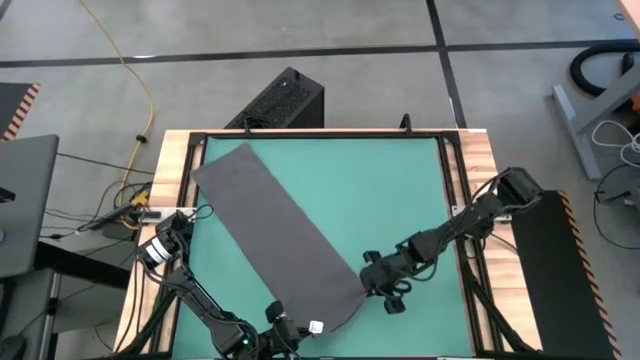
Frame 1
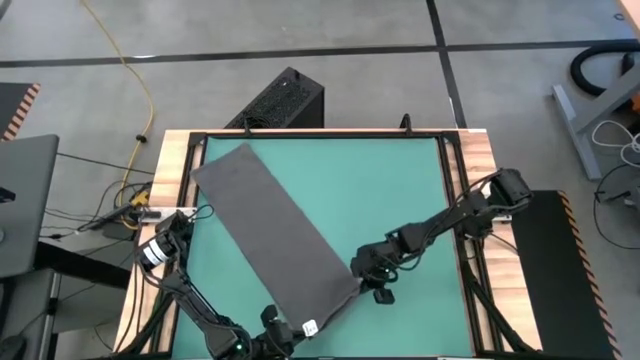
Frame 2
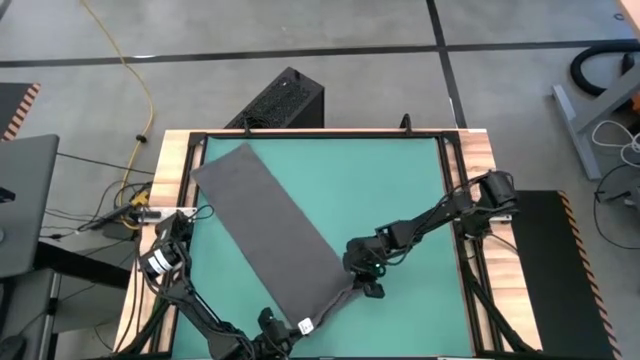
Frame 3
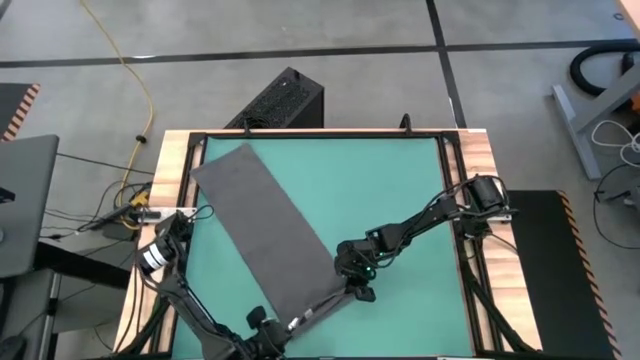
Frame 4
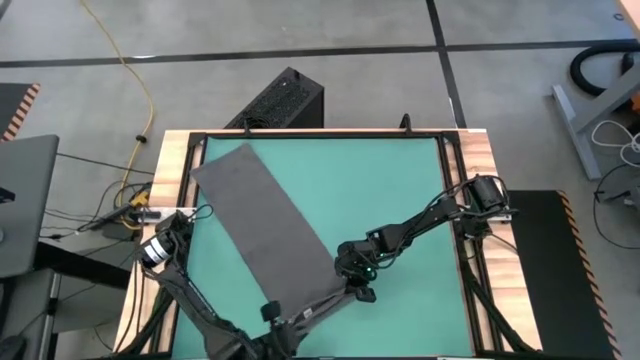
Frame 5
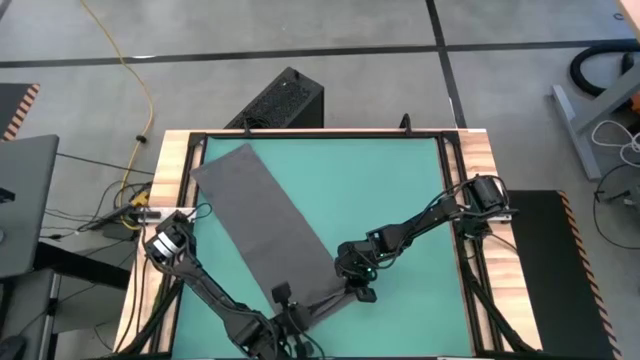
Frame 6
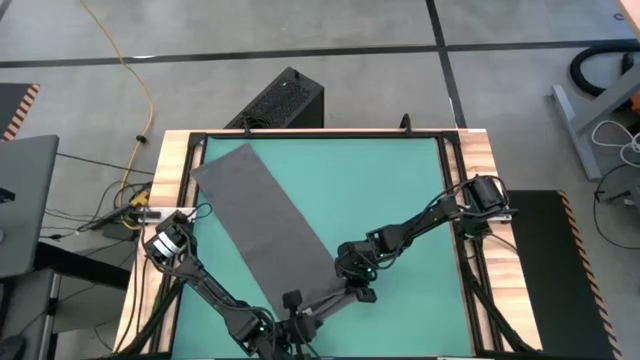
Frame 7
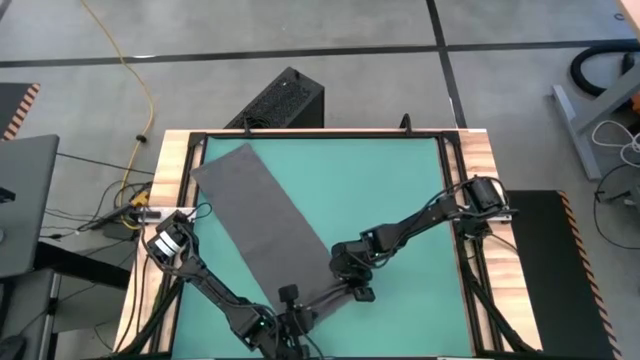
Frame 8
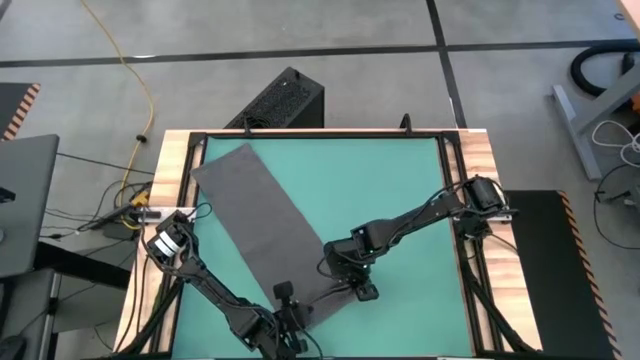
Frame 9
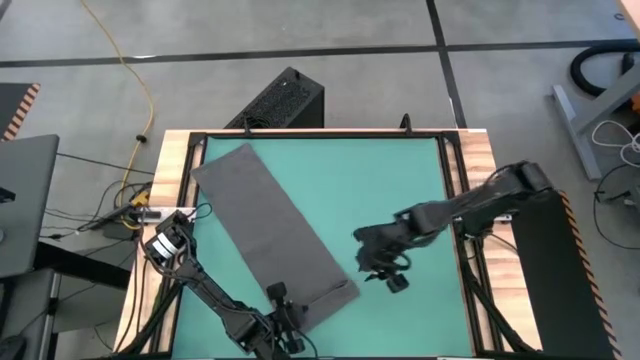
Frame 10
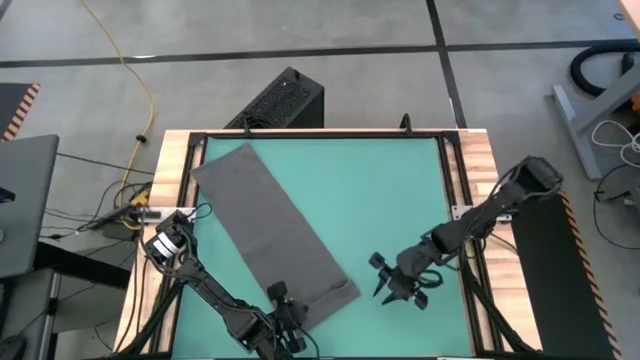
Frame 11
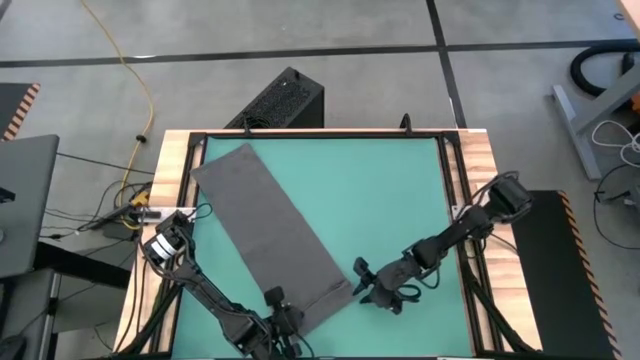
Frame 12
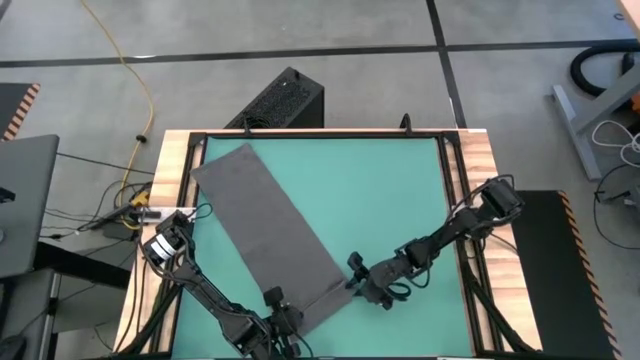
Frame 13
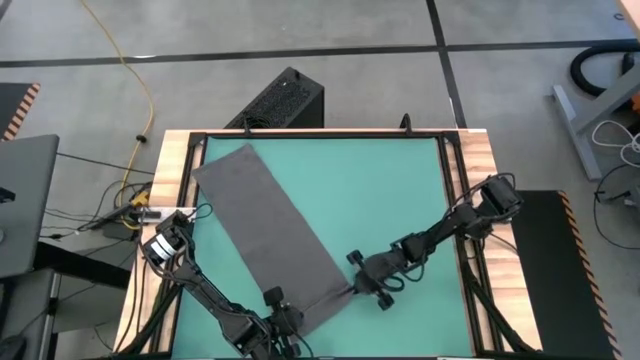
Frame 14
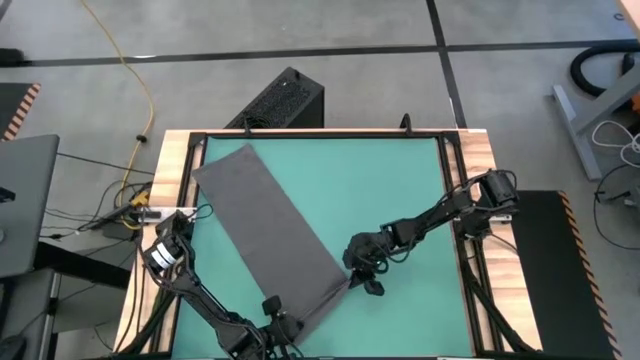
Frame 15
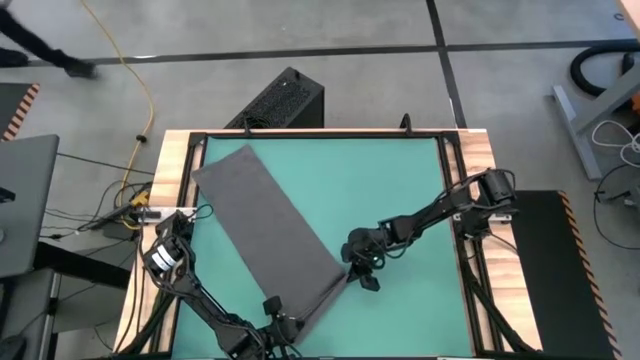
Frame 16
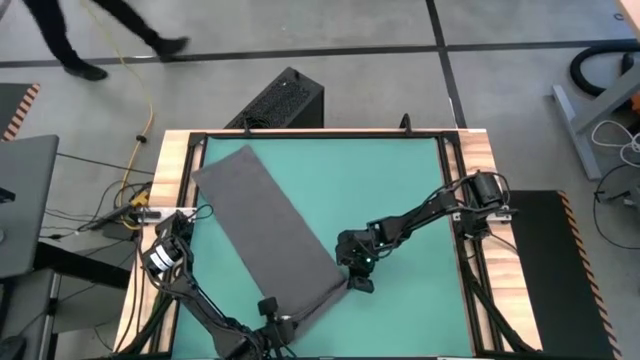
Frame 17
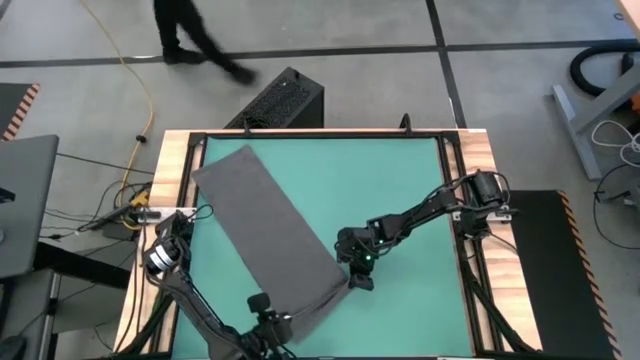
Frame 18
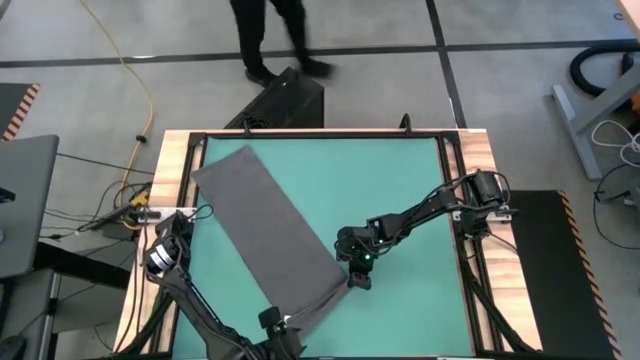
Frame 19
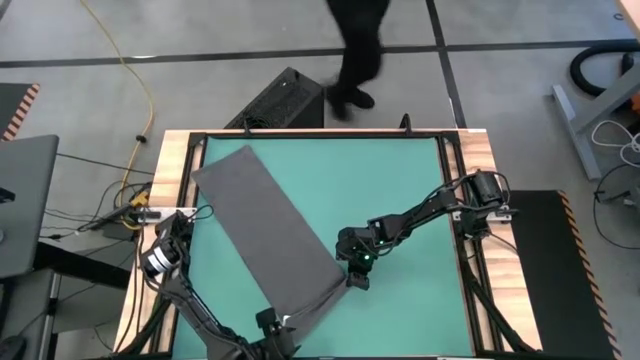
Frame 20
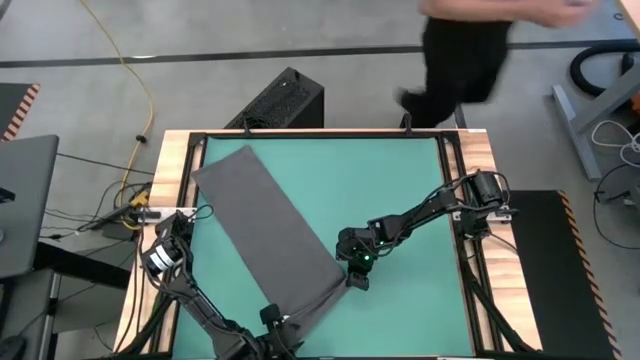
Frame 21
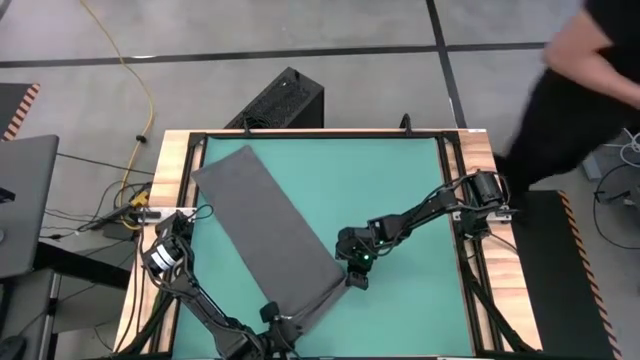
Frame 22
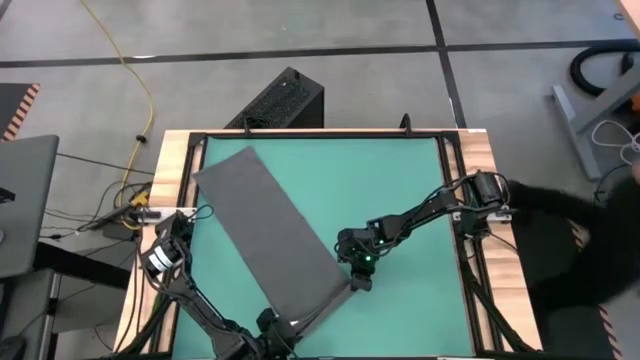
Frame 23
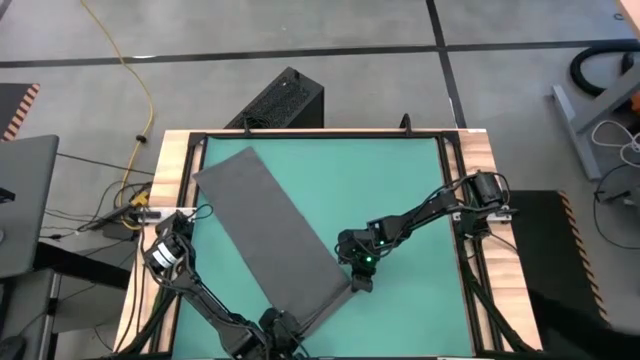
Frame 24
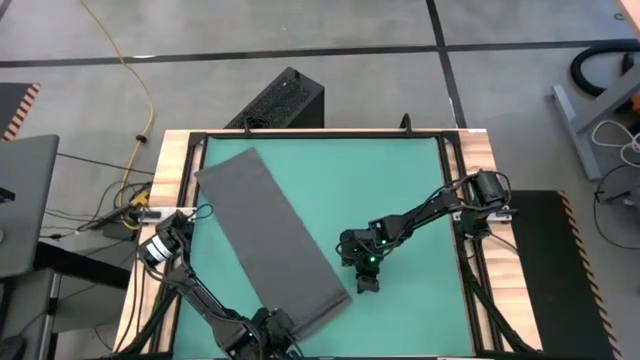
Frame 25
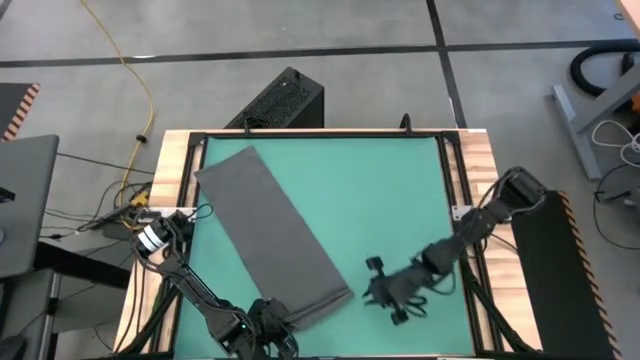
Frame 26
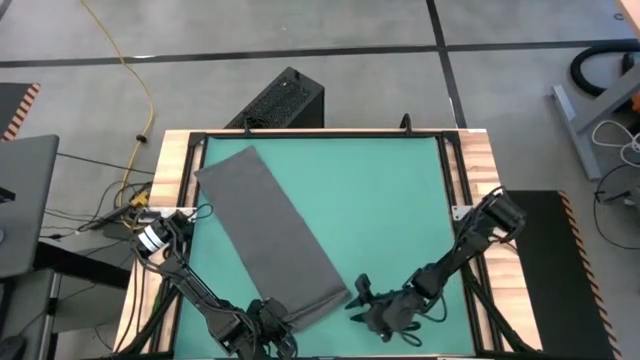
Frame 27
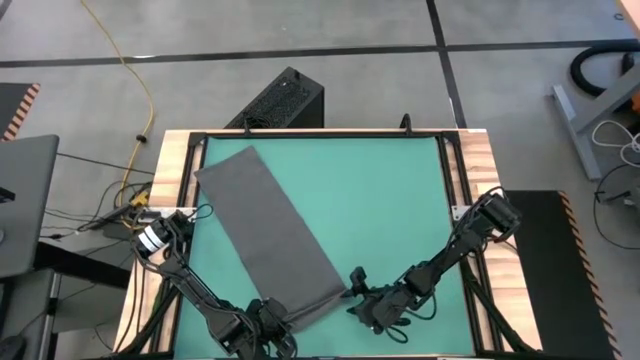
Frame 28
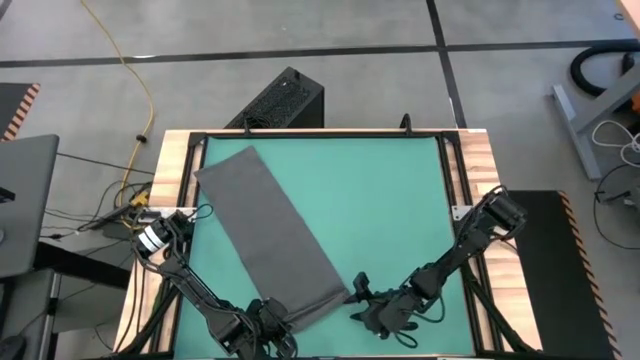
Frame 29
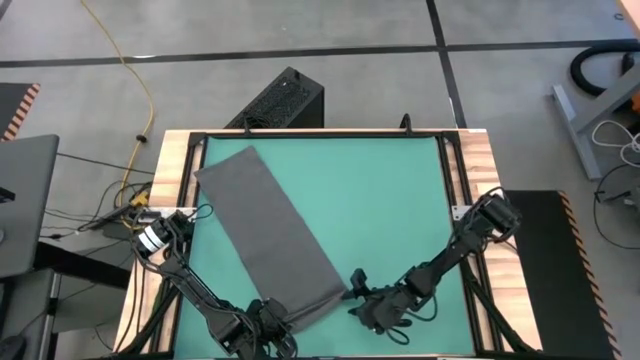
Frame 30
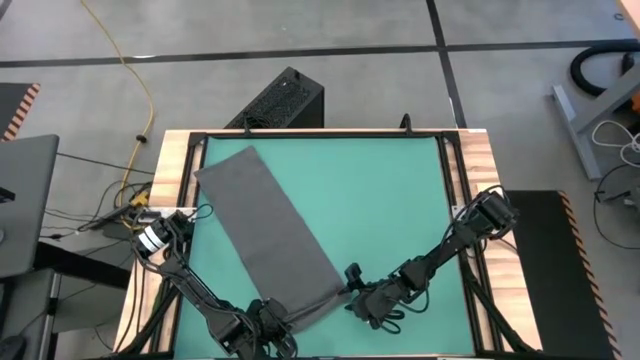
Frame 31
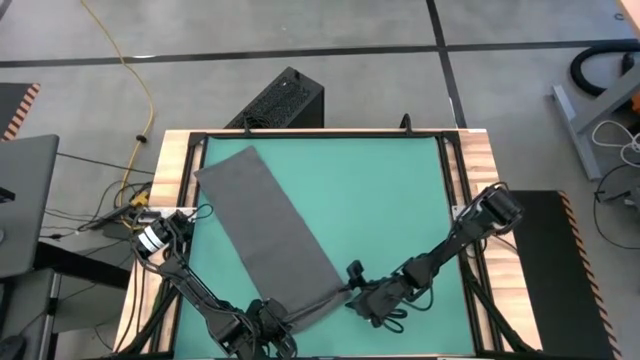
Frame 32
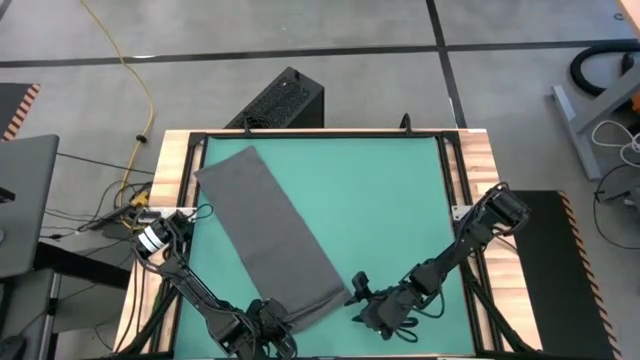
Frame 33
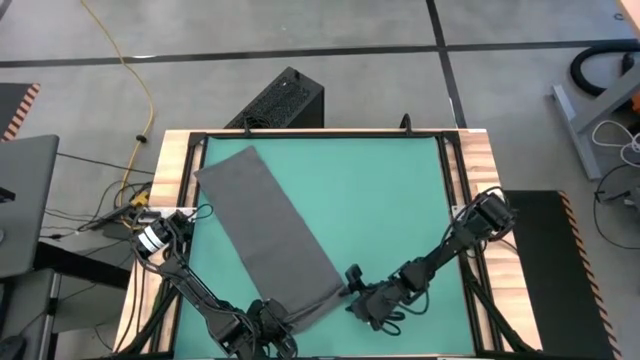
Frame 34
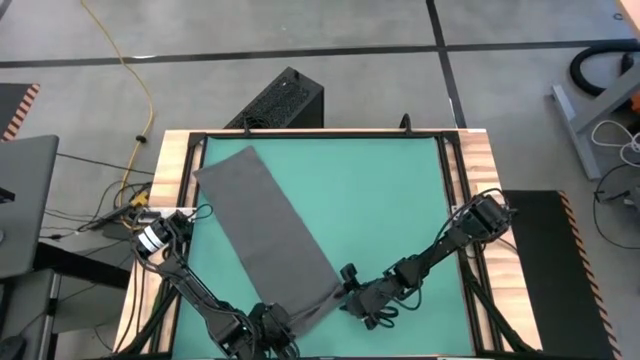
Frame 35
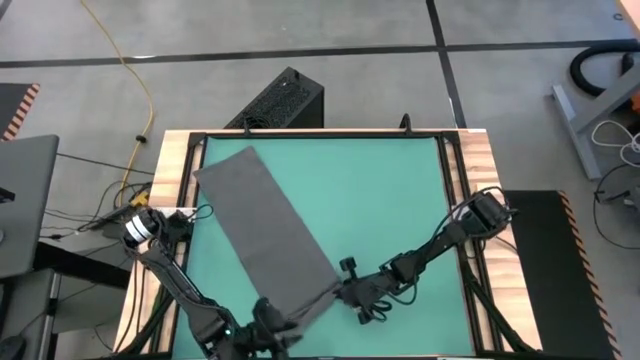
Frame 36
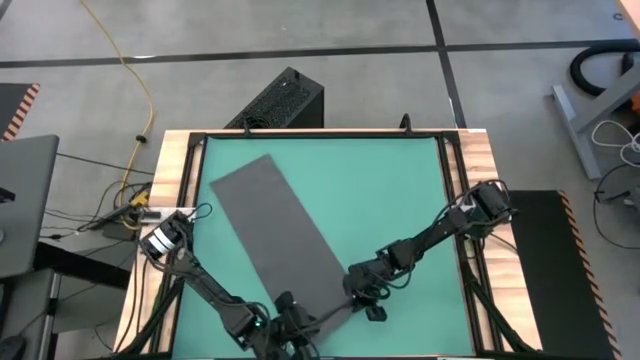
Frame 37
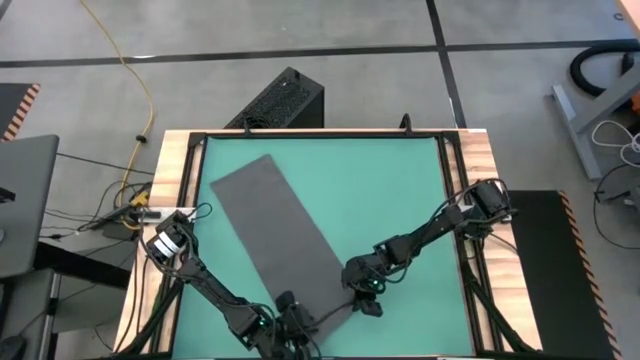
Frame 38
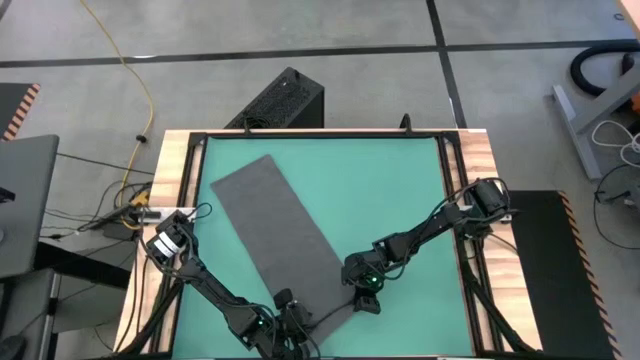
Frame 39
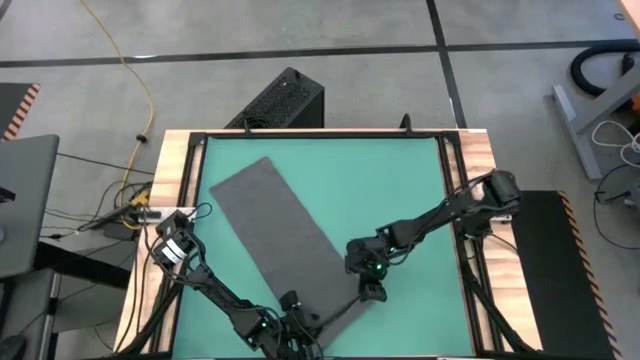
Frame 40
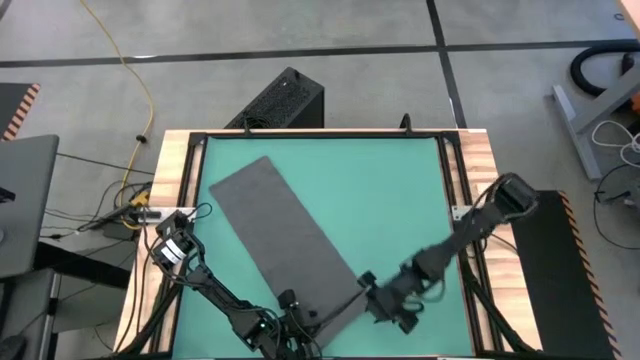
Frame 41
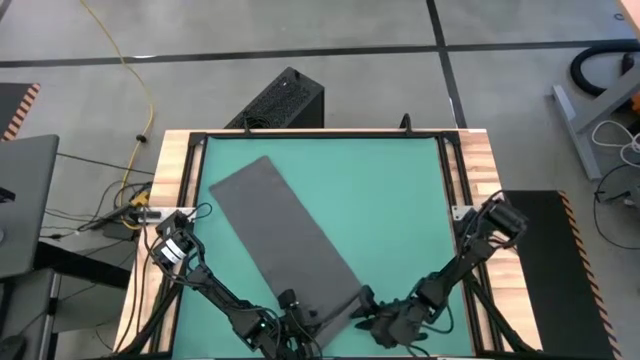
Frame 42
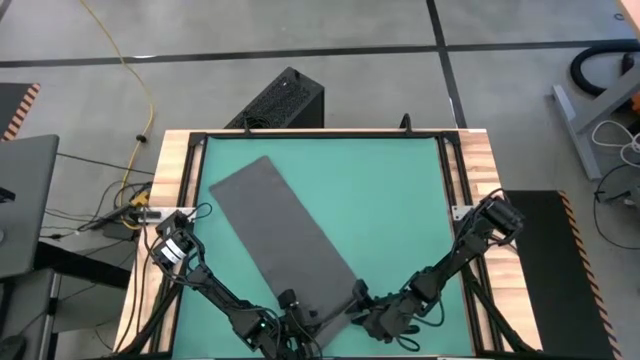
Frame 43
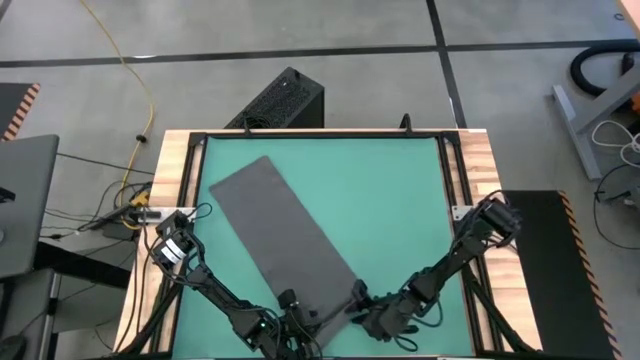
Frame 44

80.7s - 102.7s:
Task: Roll towel
Roll the gray towel
